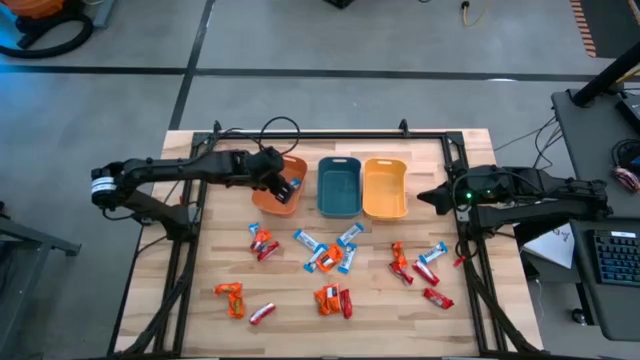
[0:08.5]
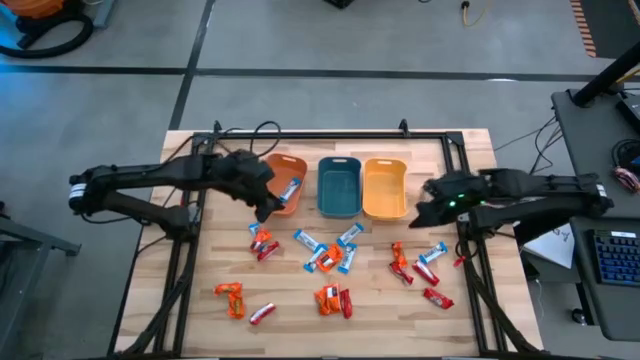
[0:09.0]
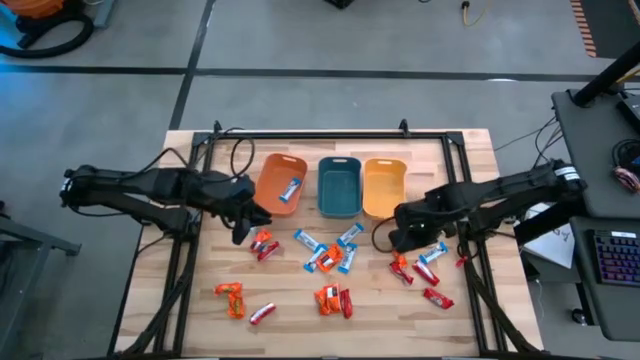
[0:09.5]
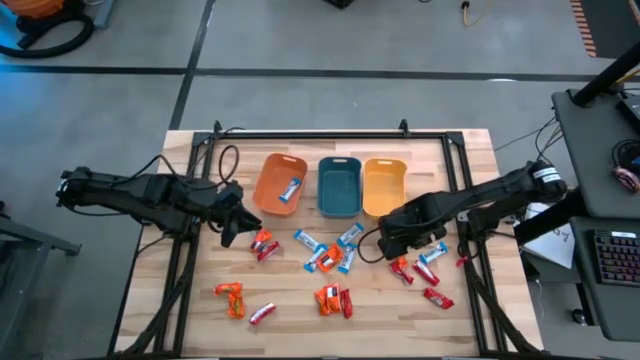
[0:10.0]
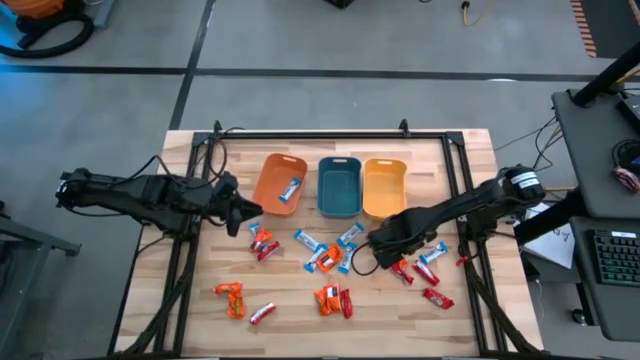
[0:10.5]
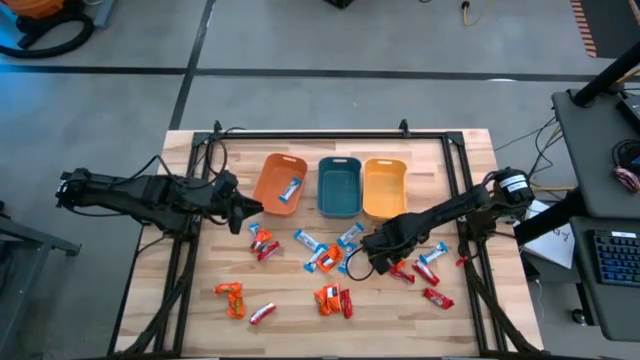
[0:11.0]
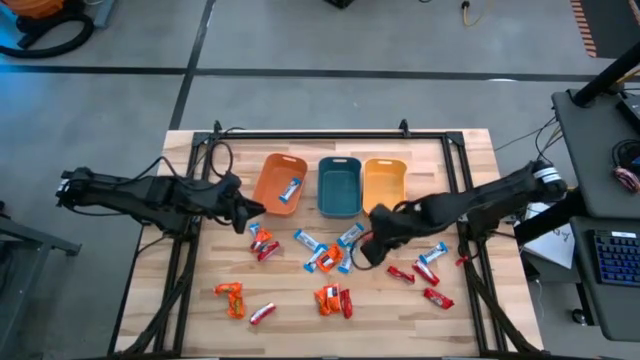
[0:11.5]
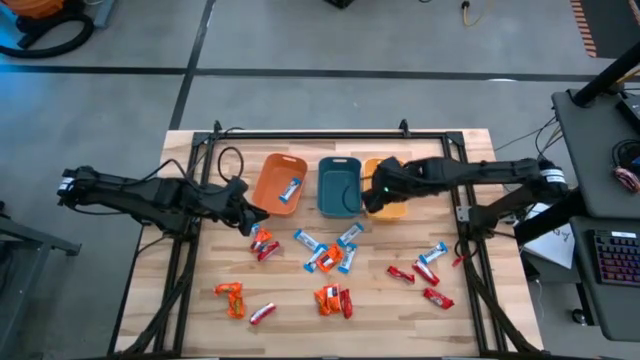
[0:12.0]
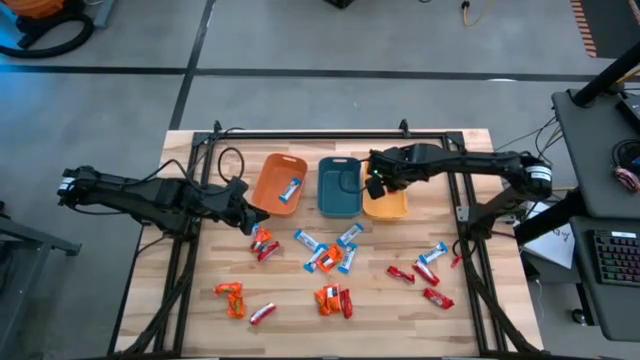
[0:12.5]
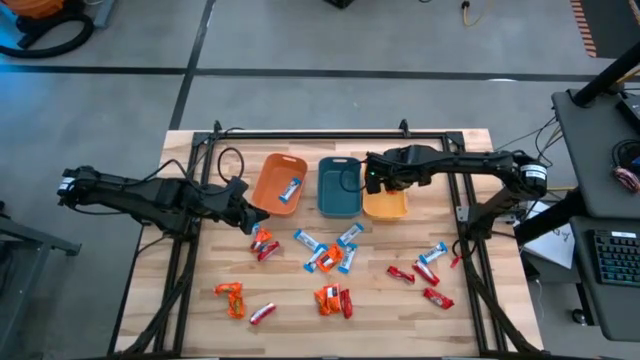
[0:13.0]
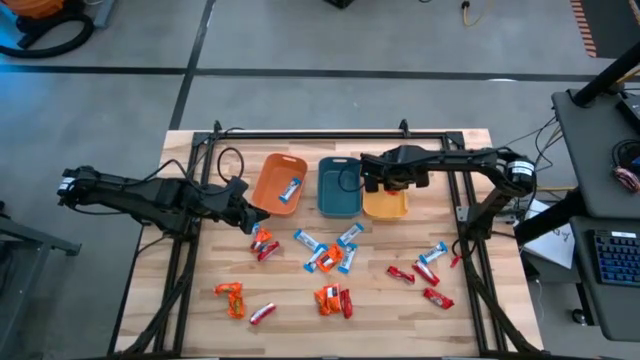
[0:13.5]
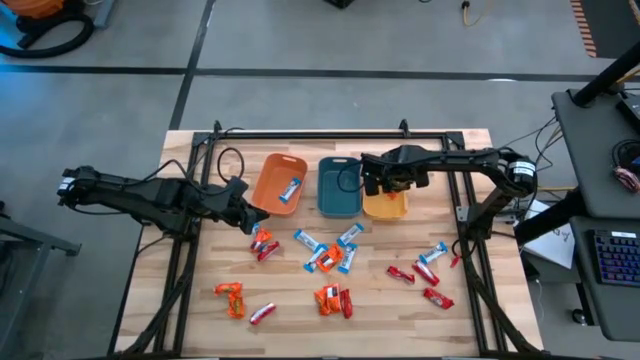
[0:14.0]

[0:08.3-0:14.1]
Task: Sort candy
Put the orange chocolate bar into the yellow bin

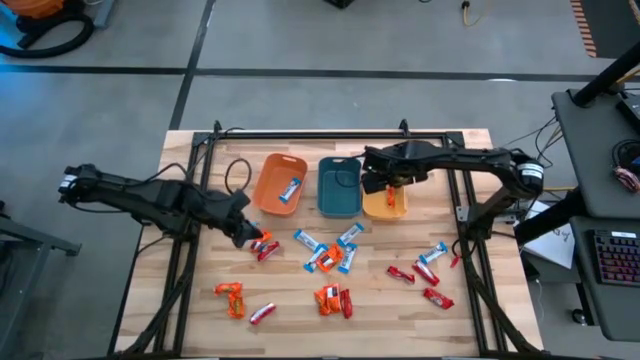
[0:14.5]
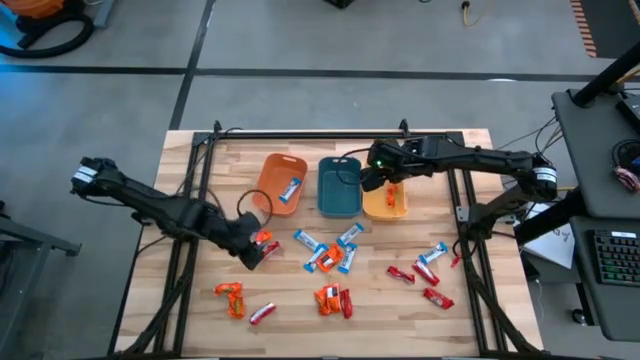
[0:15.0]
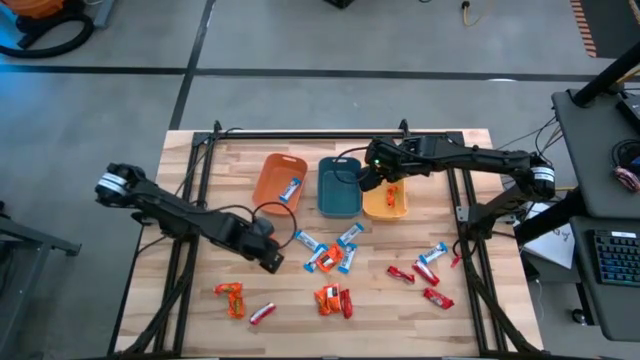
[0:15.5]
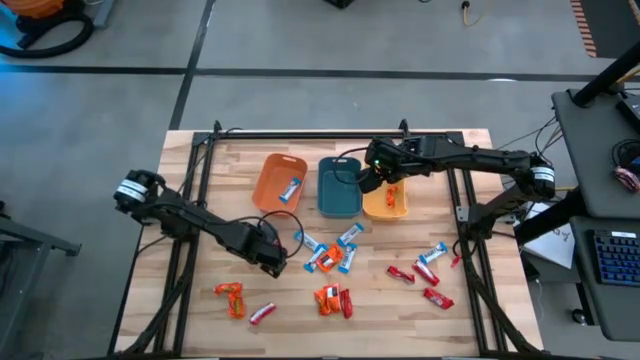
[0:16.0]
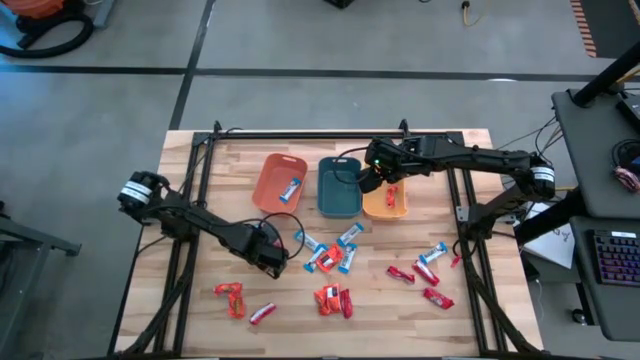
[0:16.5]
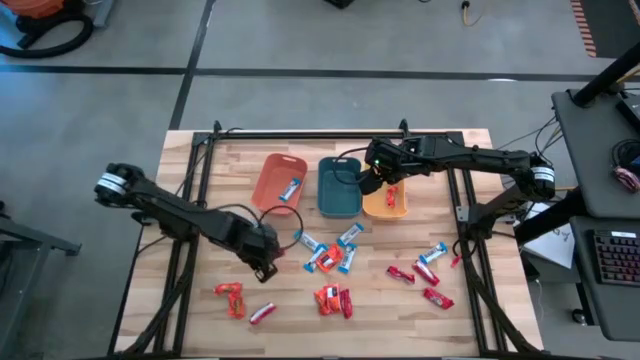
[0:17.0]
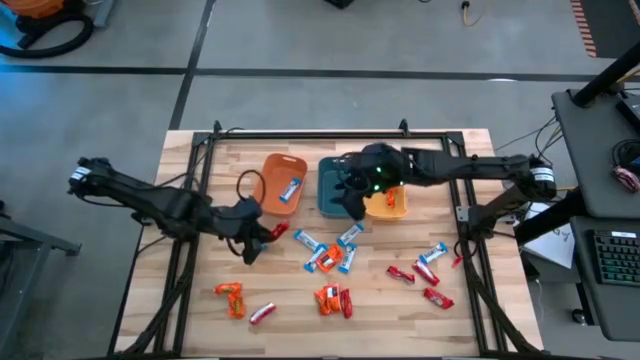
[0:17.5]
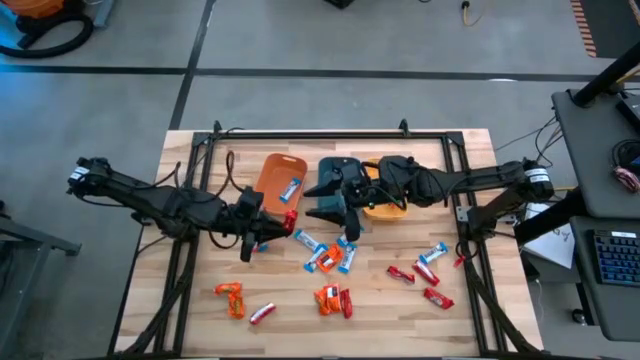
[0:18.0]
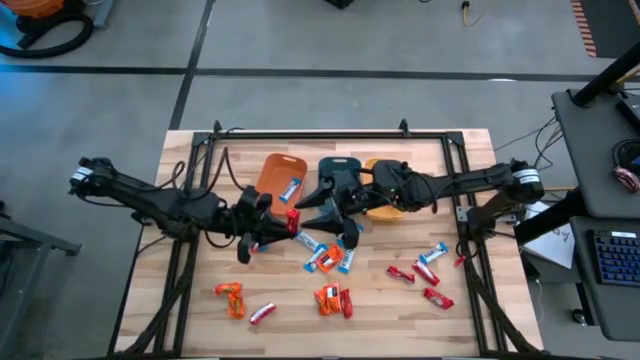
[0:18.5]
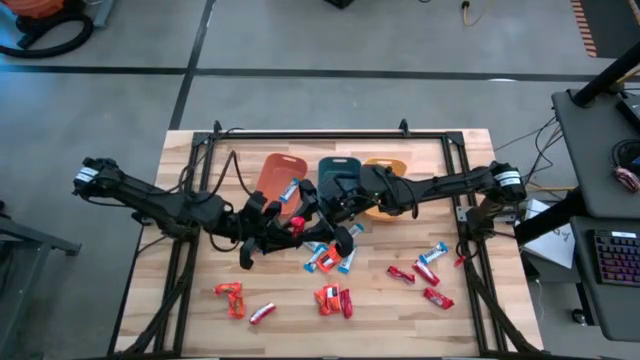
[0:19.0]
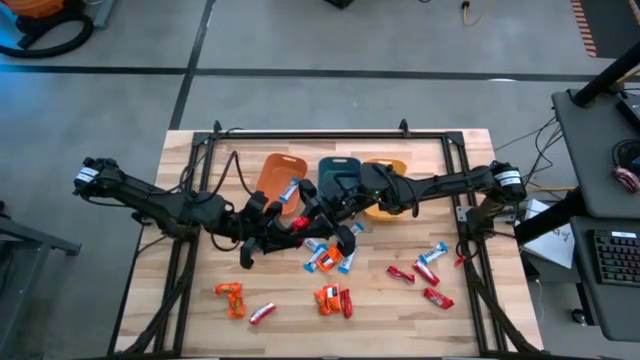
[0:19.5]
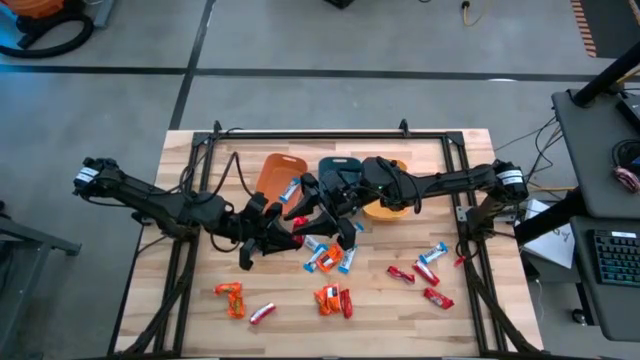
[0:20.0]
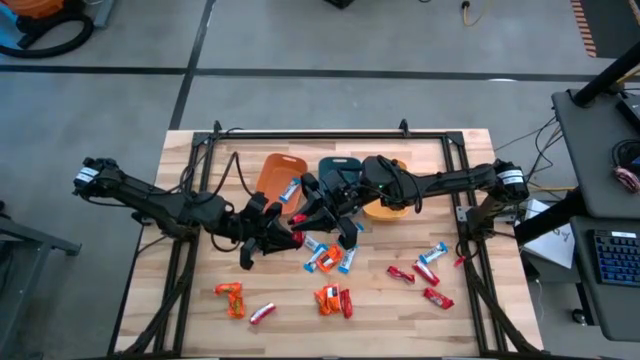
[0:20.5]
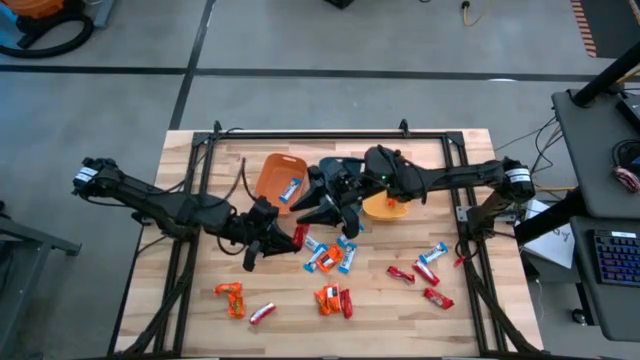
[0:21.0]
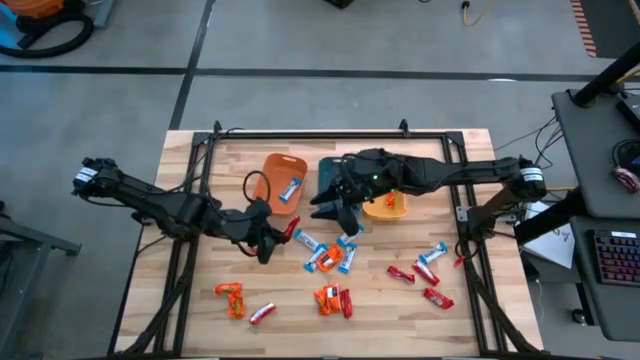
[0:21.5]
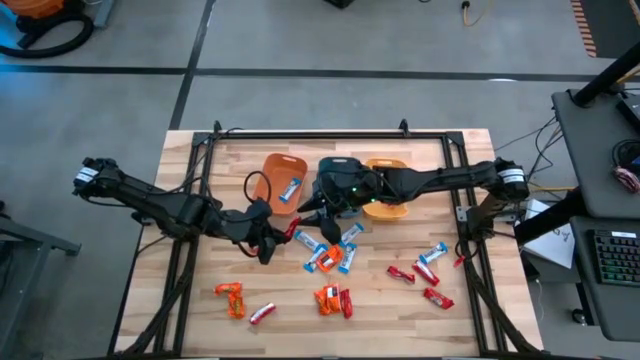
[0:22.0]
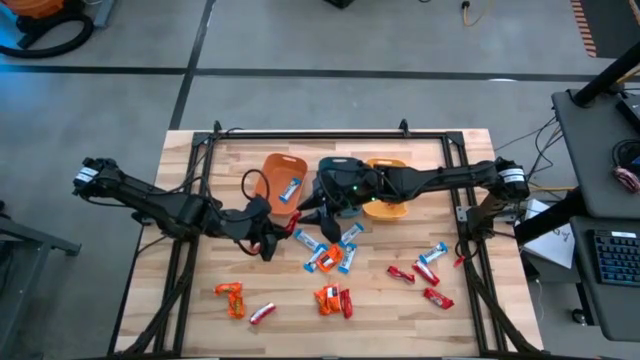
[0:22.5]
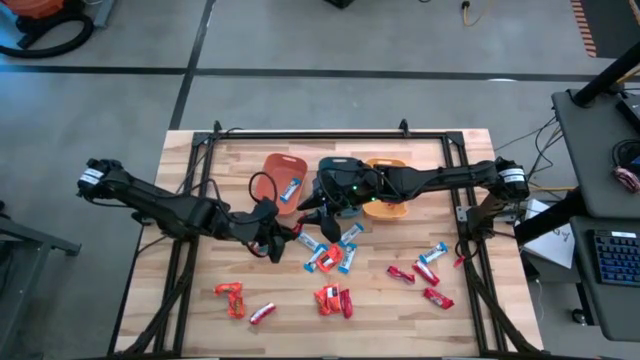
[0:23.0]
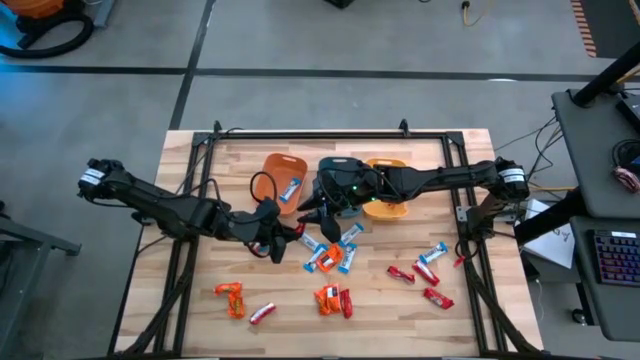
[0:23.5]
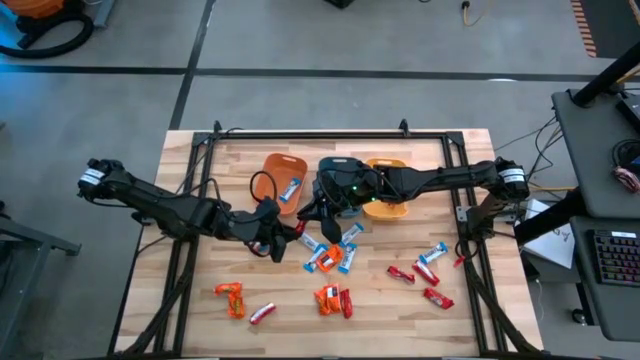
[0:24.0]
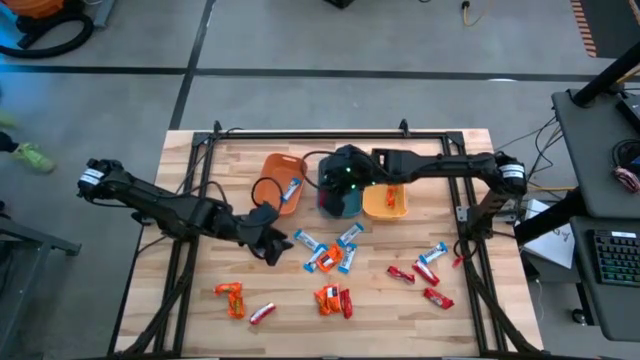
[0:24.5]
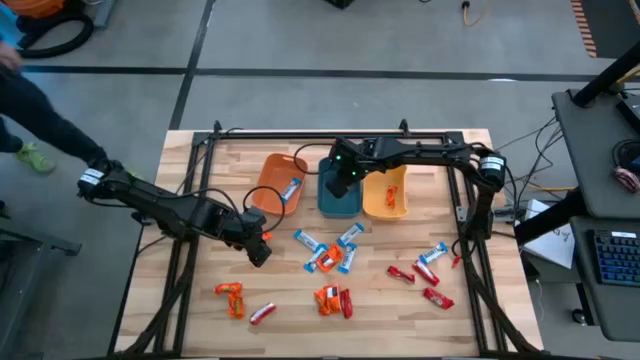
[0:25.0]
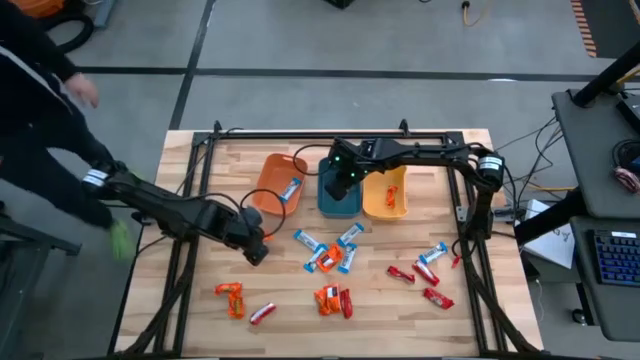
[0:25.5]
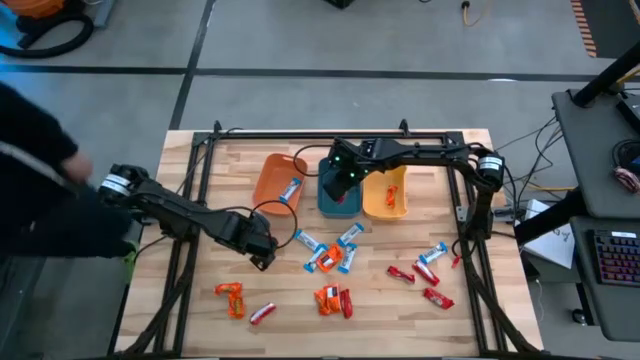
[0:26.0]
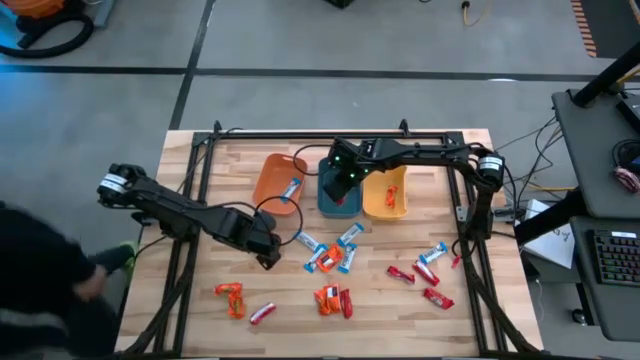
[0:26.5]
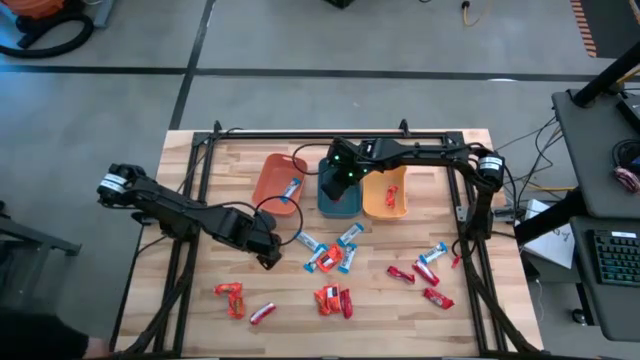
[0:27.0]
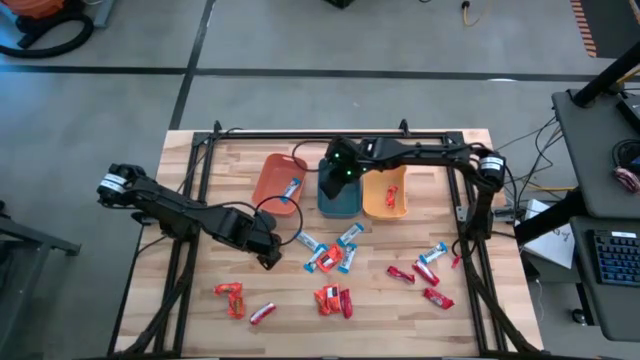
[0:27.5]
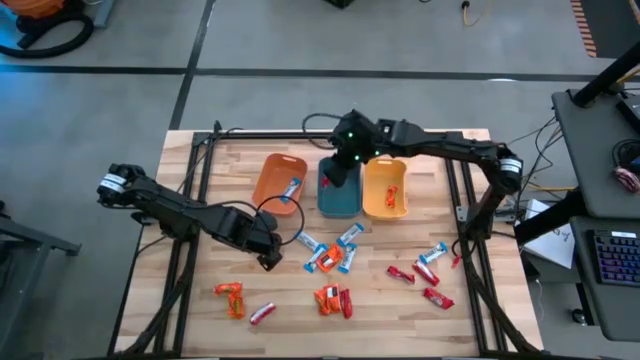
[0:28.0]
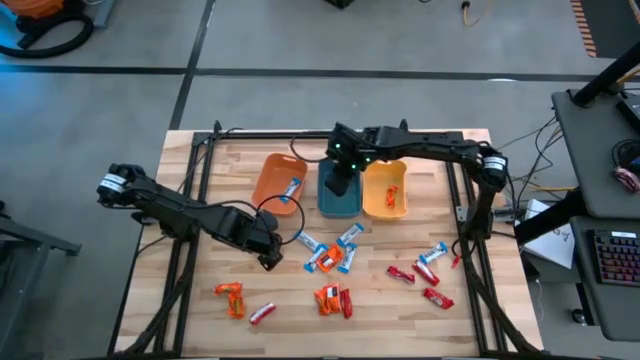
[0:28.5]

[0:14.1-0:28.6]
Put the red chocolate bar into the blue bin
